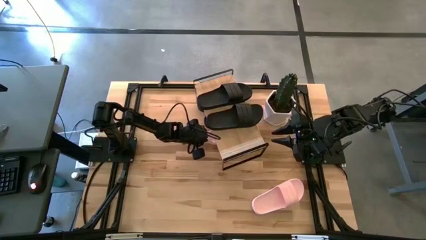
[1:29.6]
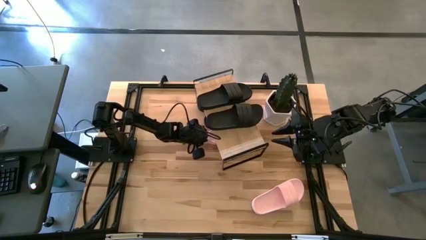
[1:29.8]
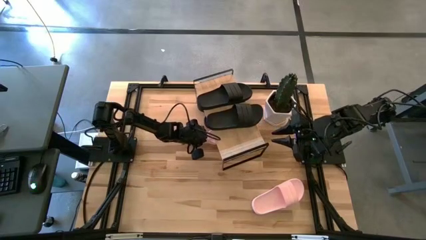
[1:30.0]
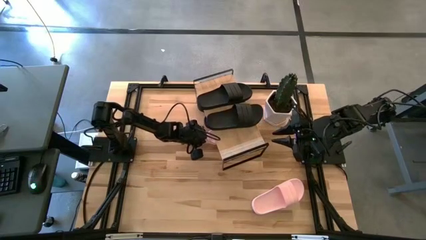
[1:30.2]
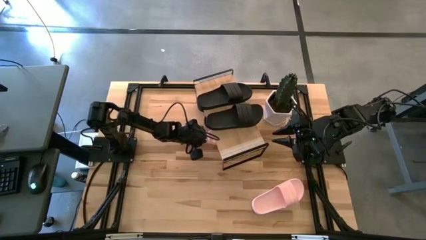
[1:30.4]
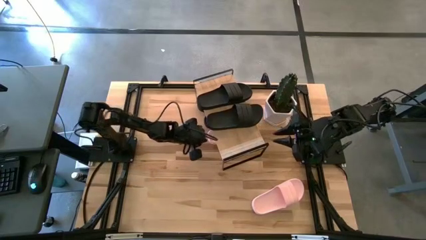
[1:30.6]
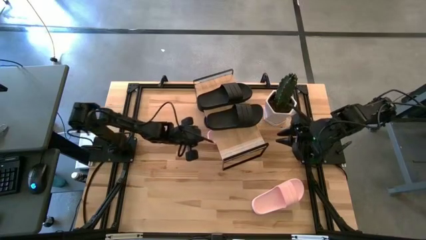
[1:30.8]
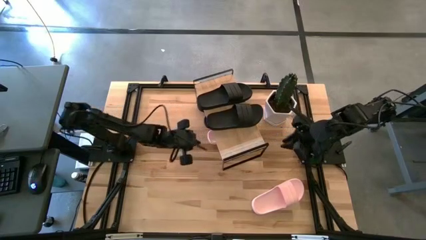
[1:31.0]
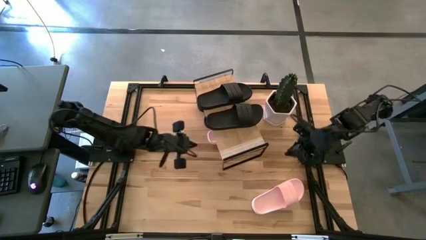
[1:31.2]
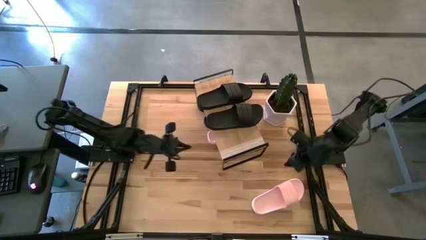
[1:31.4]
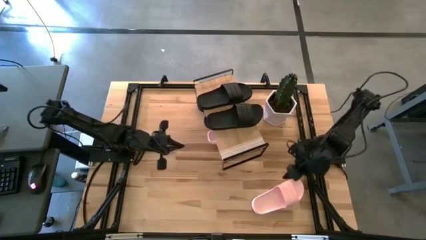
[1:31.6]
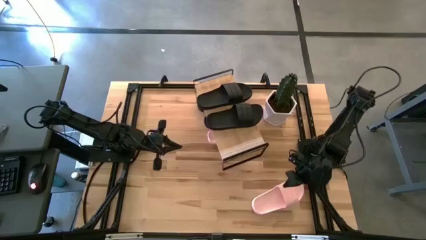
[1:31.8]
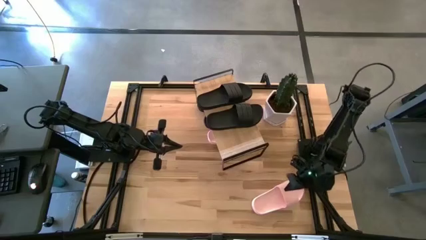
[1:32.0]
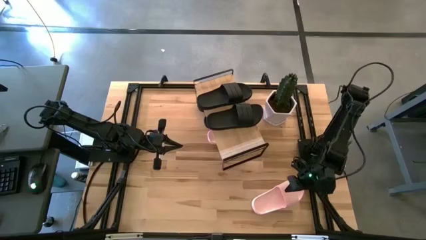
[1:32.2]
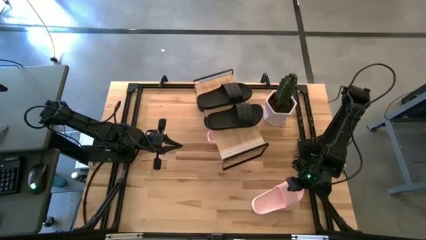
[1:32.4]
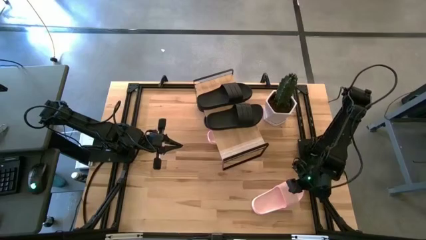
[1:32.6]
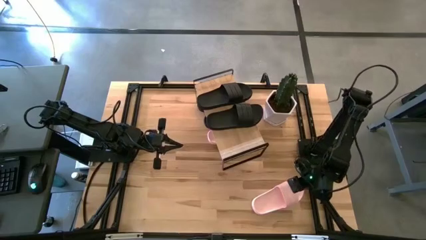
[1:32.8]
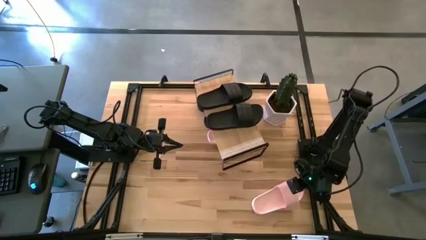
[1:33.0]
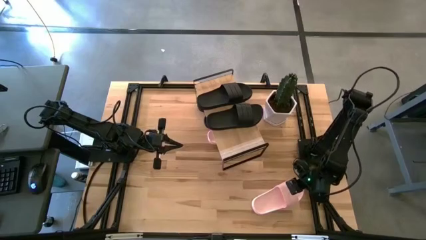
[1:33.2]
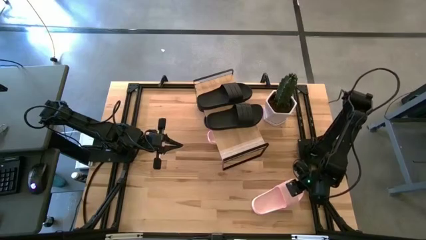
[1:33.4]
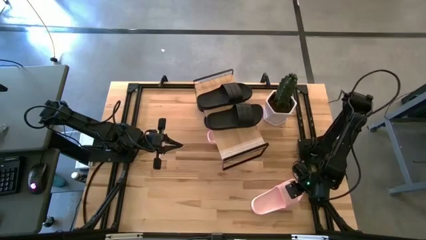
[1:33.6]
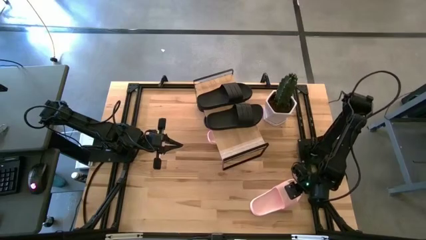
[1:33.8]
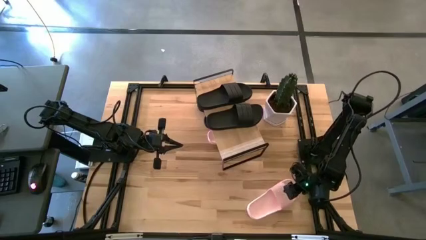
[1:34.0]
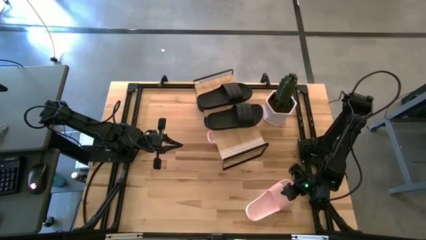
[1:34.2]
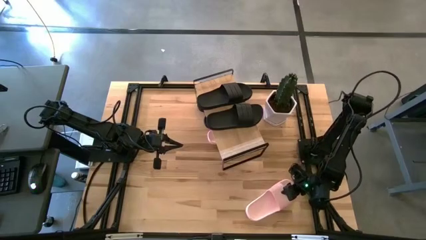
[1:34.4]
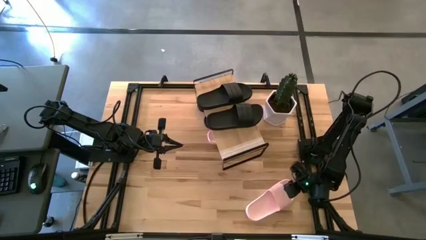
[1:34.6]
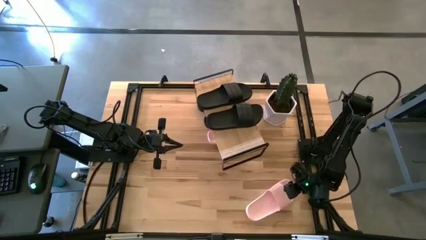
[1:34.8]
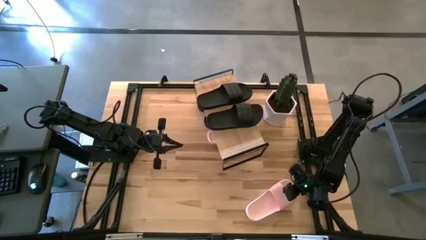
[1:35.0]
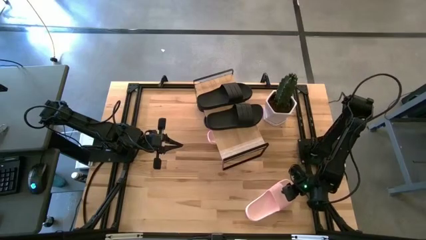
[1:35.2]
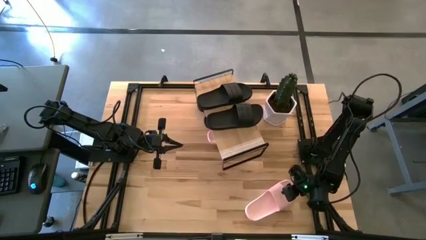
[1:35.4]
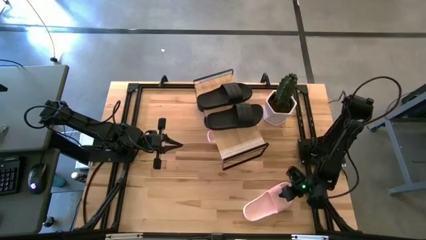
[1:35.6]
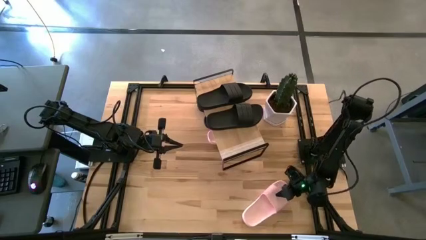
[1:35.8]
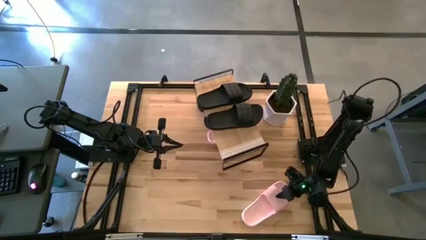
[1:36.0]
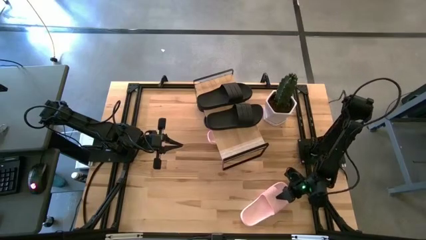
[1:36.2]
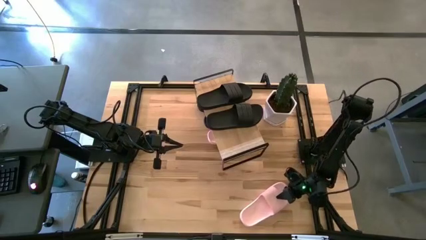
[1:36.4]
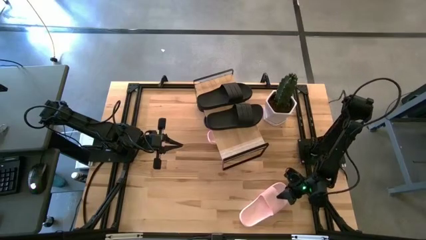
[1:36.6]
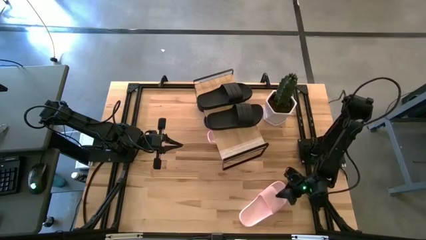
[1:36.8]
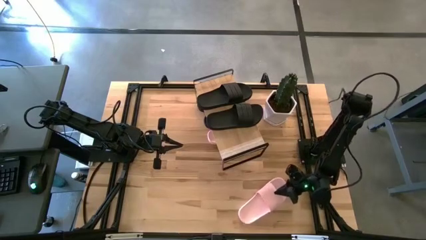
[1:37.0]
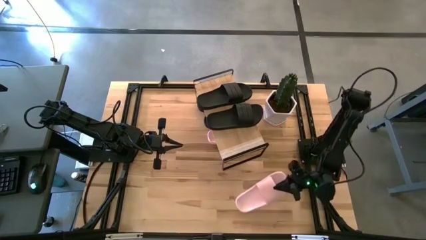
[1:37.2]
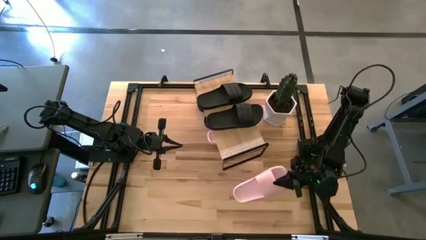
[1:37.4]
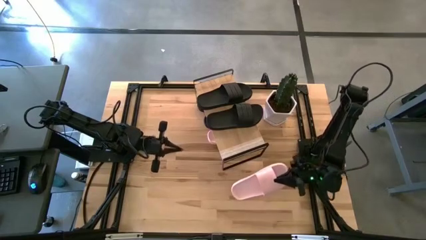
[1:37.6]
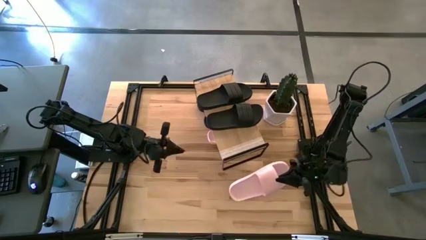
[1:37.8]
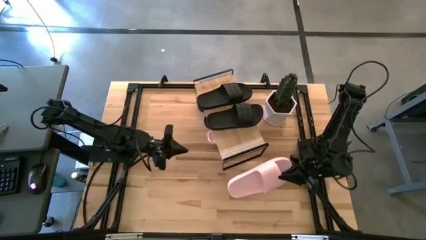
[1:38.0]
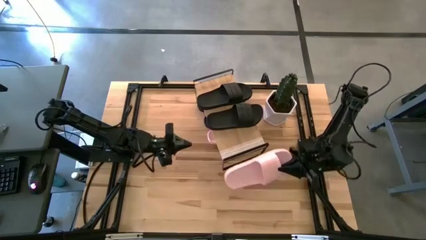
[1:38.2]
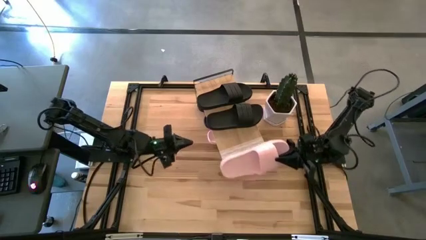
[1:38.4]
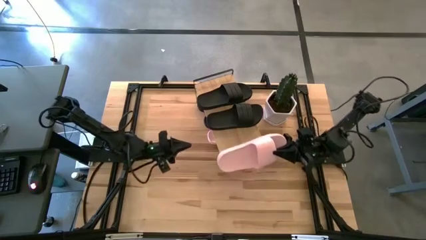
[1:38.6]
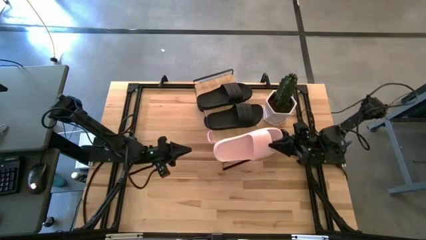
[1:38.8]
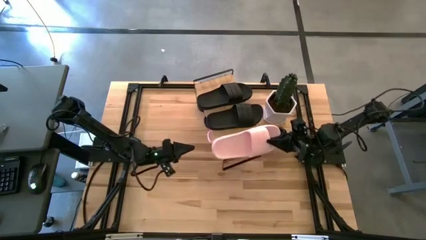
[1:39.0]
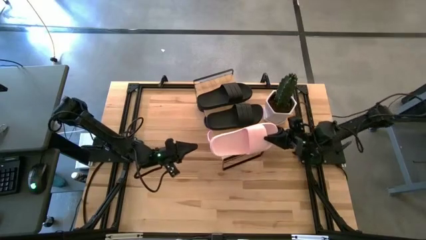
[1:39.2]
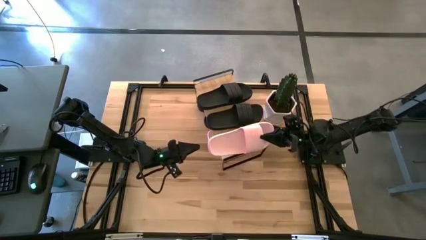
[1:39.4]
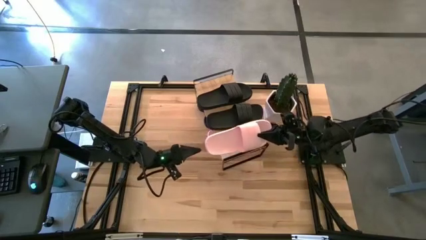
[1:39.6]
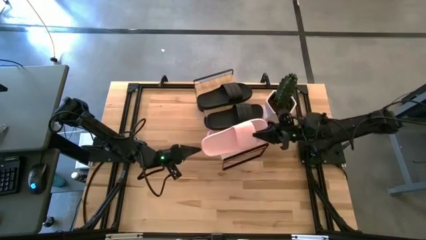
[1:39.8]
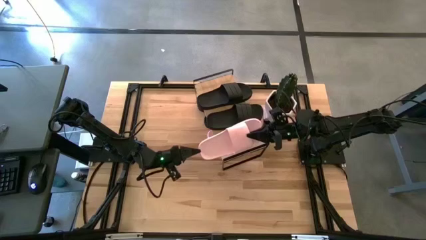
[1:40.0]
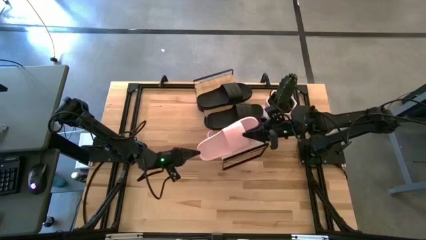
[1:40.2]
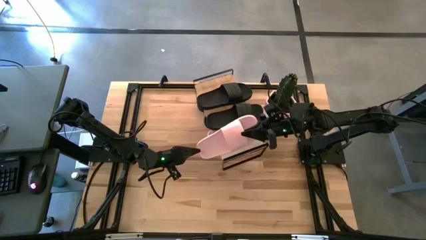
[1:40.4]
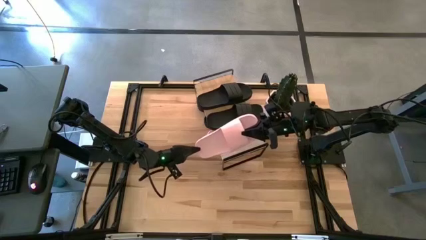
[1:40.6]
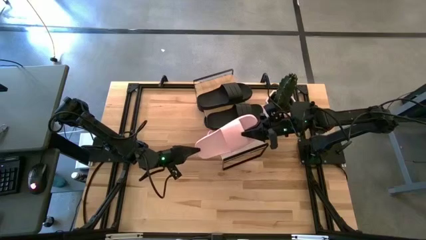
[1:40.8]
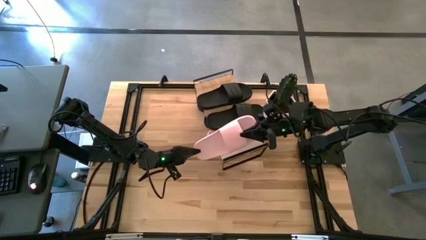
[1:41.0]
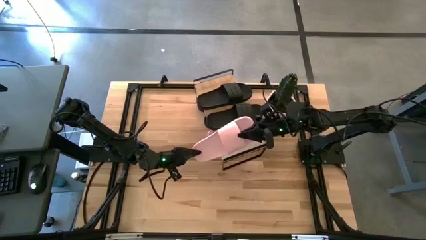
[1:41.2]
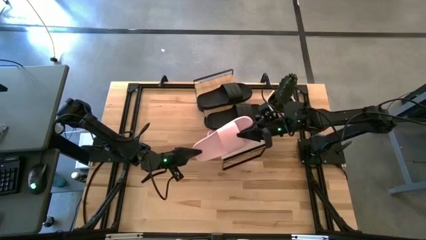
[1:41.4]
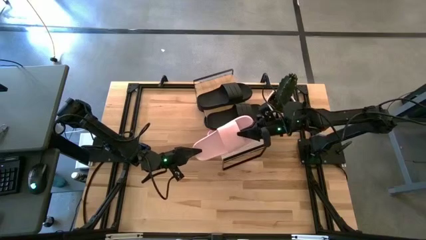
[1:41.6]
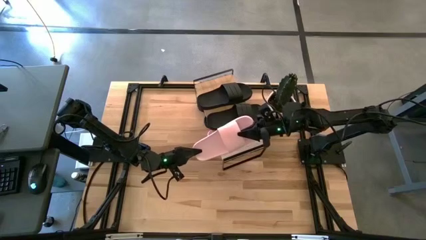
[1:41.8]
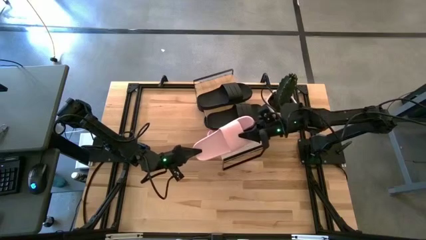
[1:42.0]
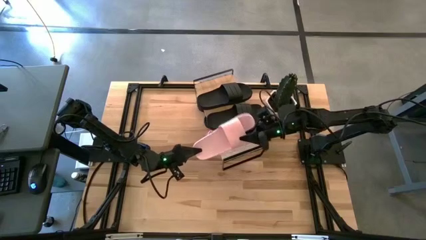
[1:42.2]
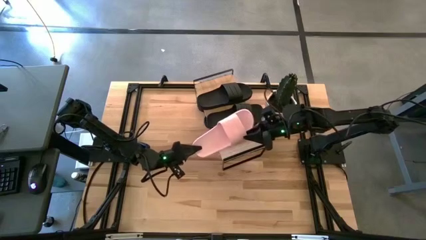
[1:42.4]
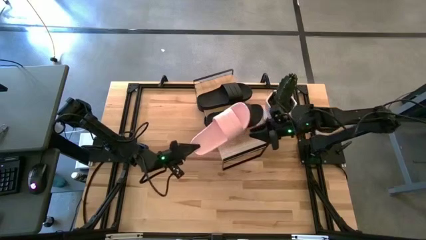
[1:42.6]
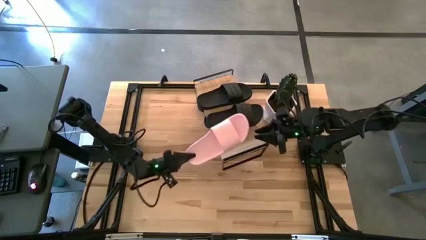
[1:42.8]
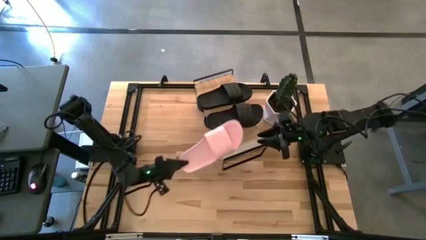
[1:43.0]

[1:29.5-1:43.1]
Task: Pick and place slides into the shelf
Put the pink slide under the shelf

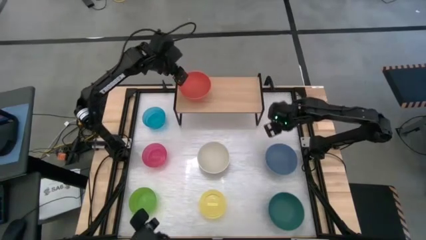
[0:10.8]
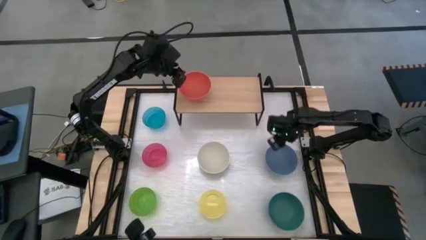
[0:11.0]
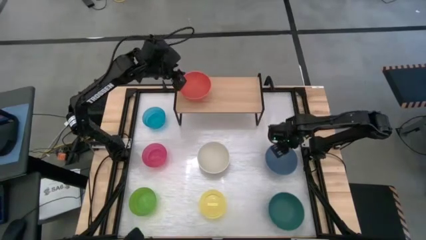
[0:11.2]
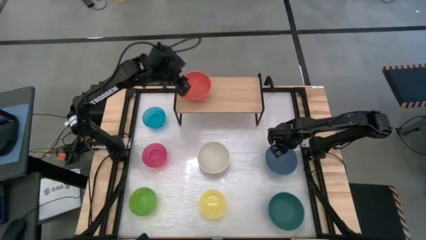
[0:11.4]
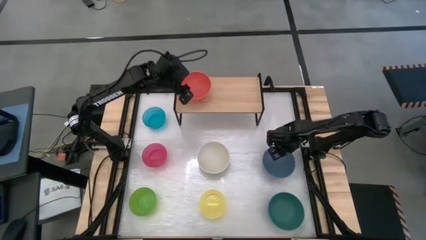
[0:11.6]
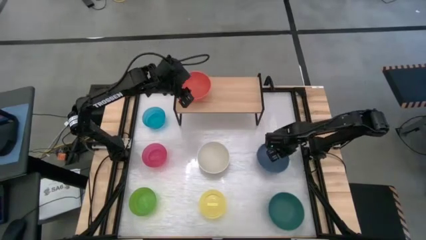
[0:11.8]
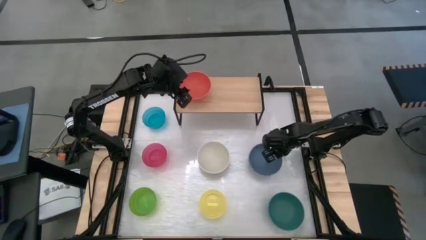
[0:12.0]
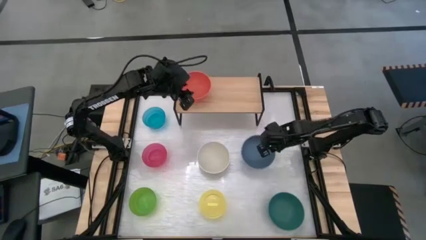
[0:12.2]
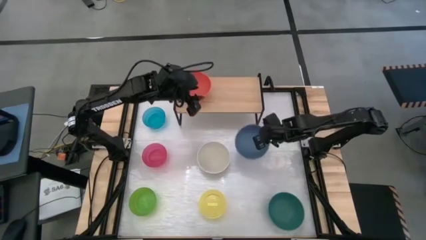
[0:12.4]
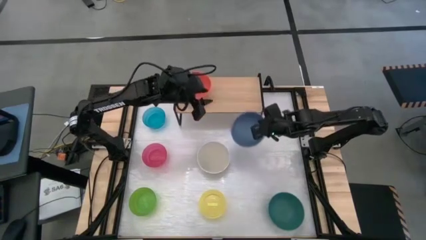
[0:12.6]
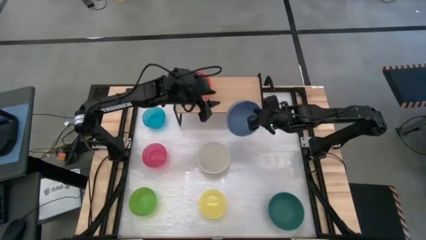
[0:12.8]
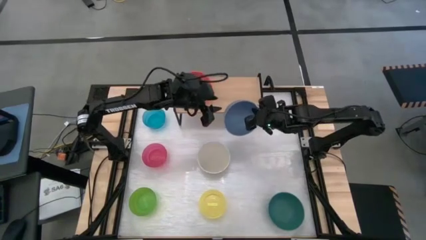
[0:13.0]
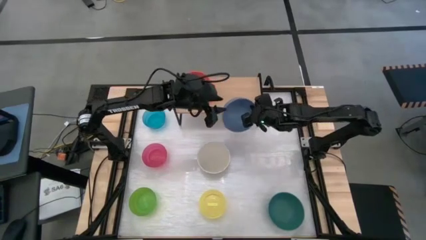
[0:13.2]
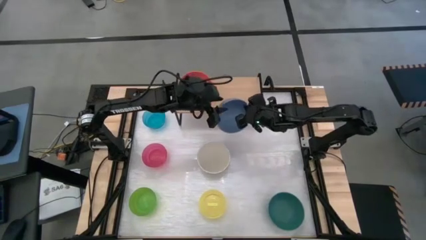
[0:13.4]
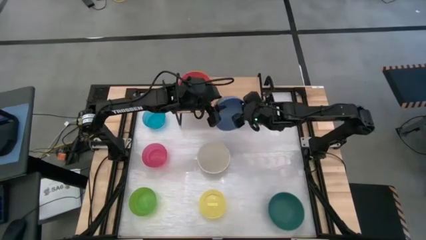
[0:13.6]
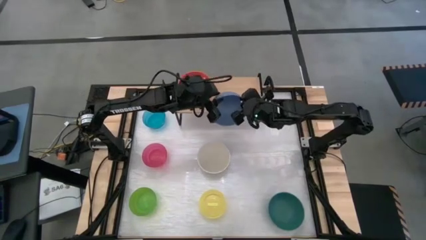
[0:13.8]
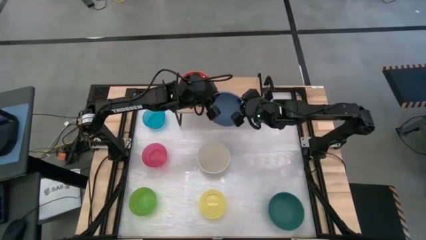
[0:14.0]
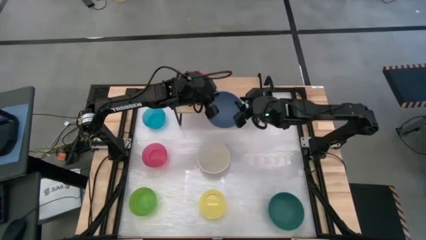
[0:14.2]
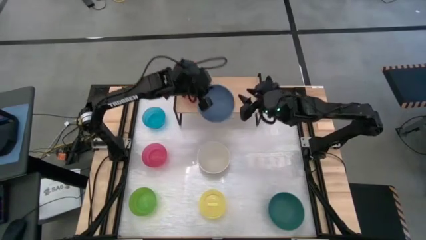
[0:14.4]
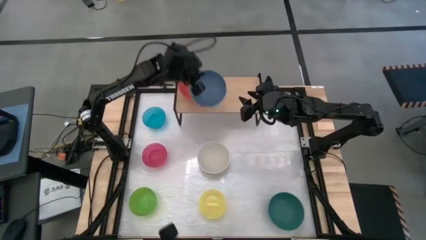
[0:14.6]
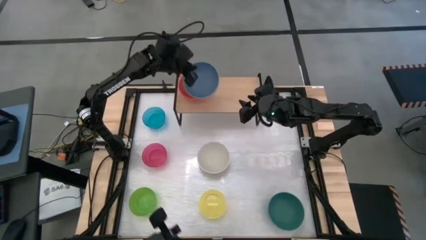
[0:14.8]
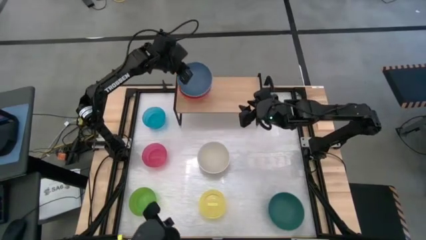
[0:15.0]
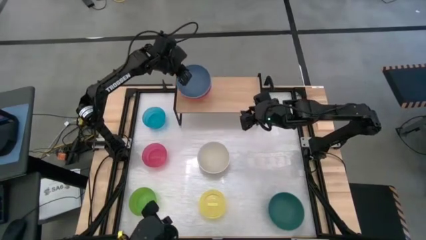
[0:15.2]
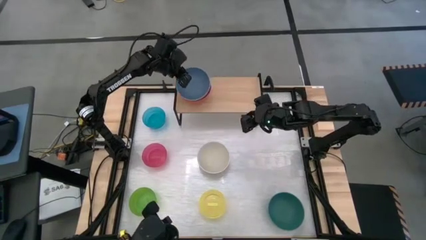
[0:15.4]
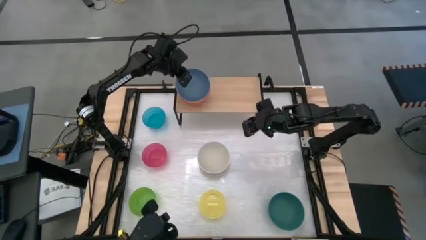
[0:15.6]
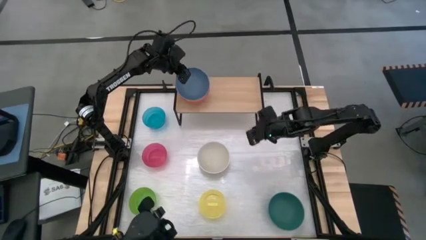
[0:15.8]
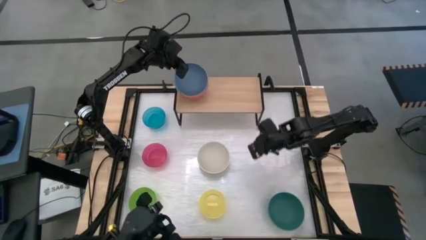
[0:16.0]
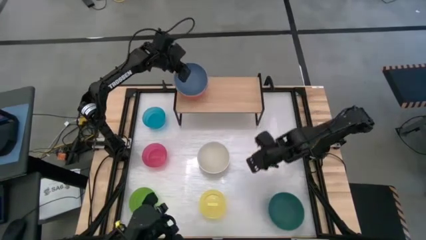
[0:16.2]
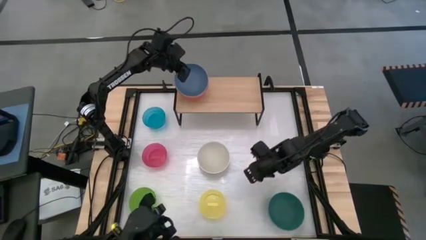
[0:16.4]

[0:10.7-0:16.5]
Task: Place and stack bowls onto a shelf
Stack the blue bowl on top of the orange bowl on the shelf
